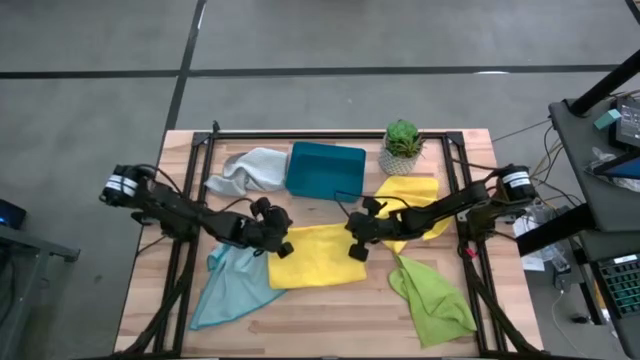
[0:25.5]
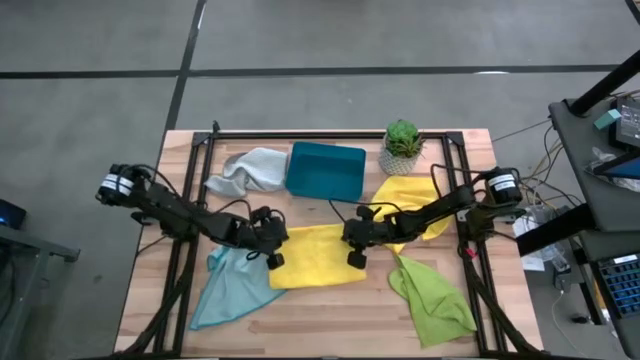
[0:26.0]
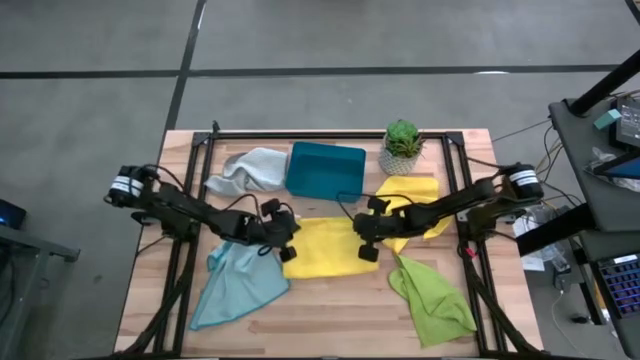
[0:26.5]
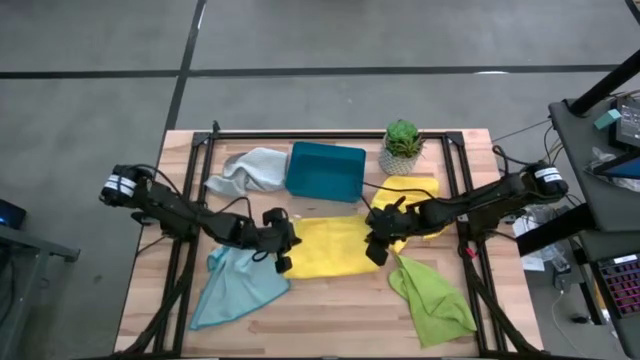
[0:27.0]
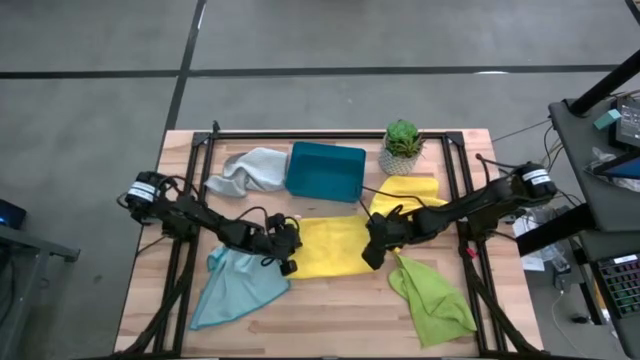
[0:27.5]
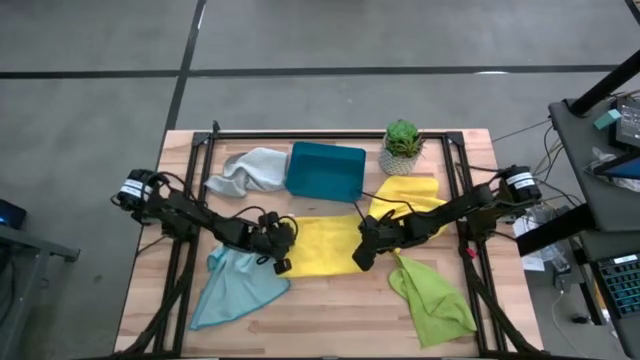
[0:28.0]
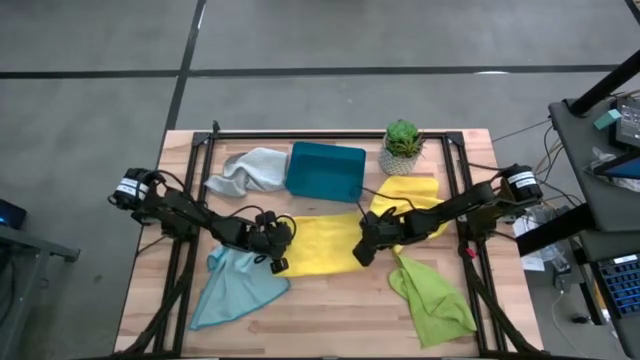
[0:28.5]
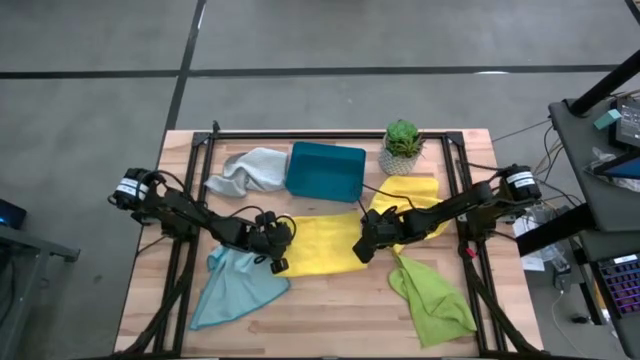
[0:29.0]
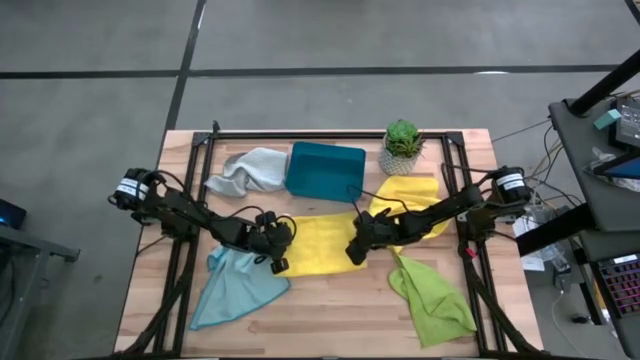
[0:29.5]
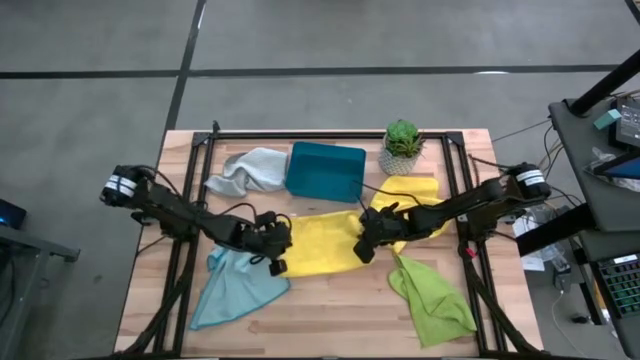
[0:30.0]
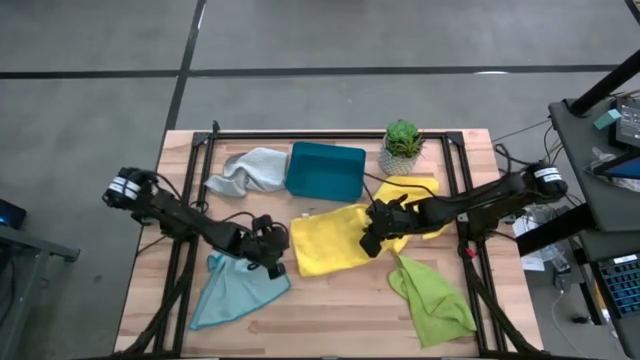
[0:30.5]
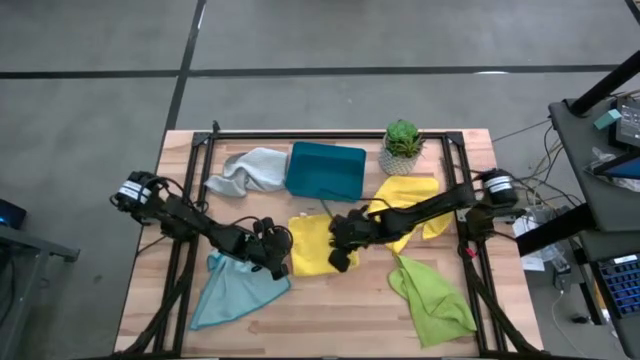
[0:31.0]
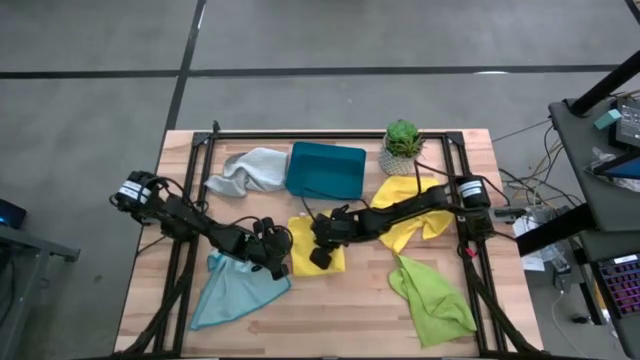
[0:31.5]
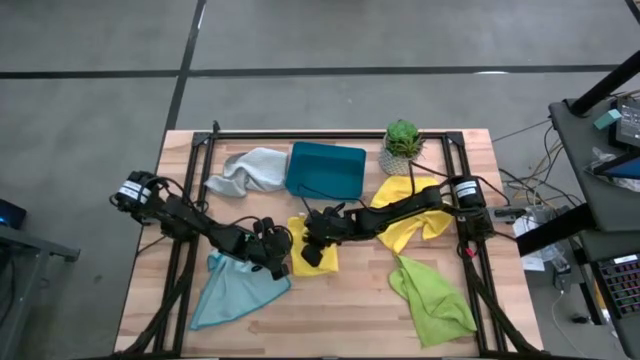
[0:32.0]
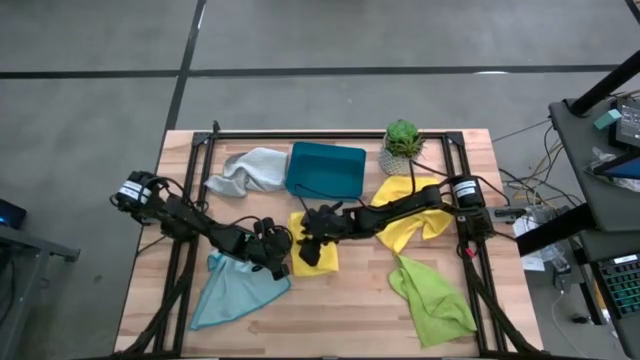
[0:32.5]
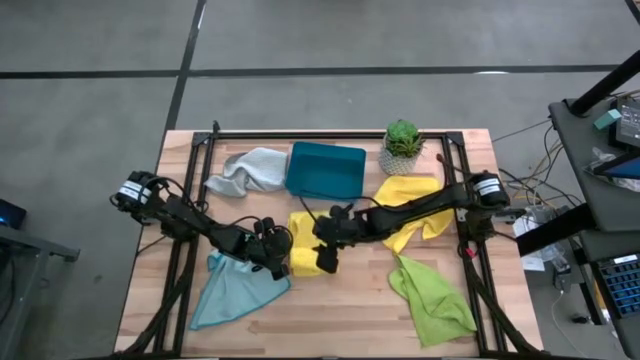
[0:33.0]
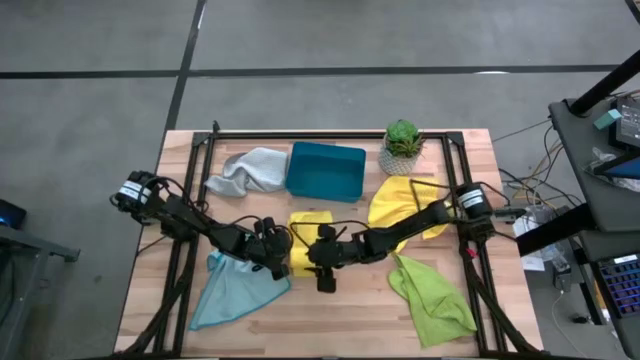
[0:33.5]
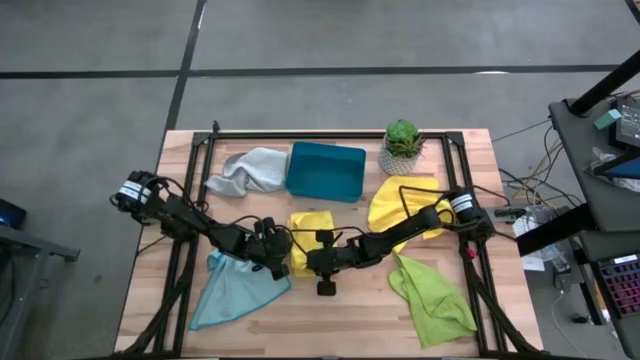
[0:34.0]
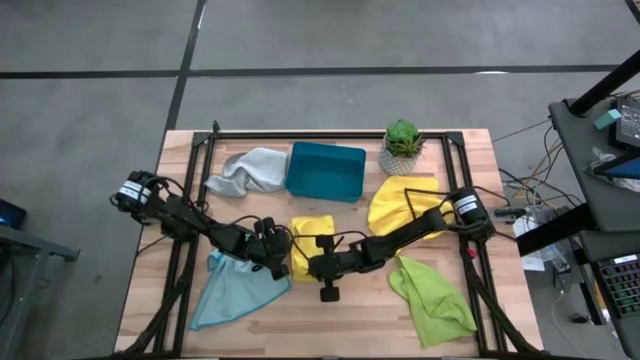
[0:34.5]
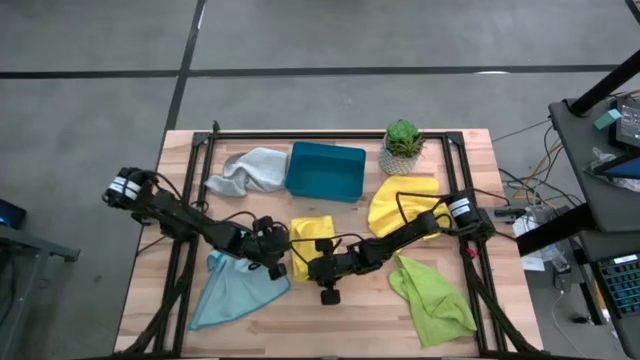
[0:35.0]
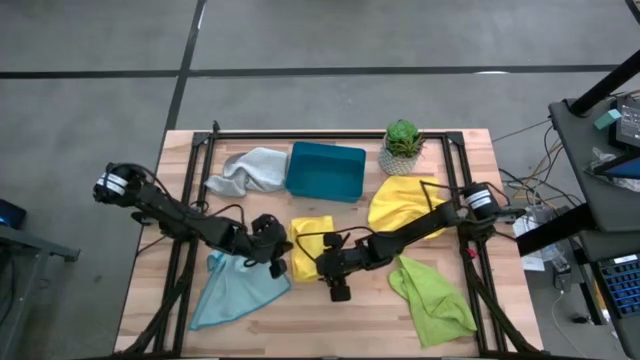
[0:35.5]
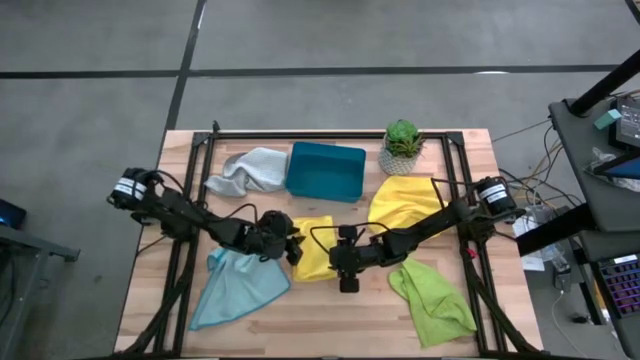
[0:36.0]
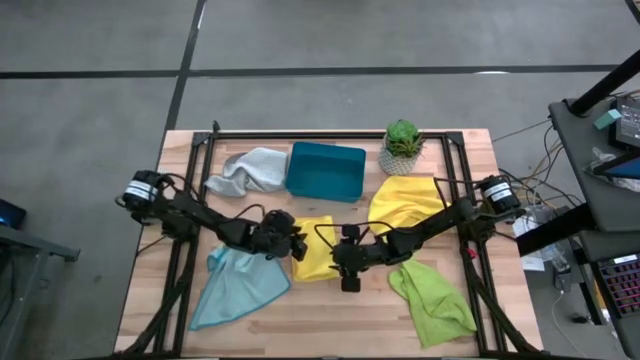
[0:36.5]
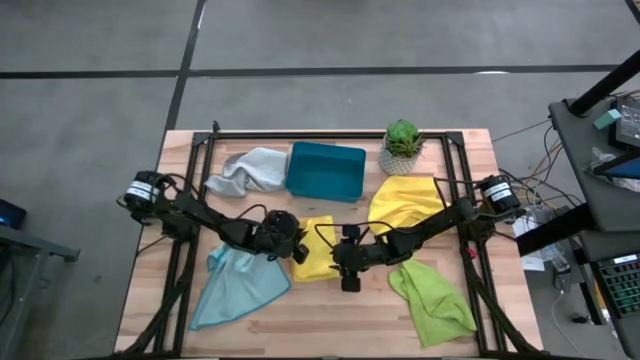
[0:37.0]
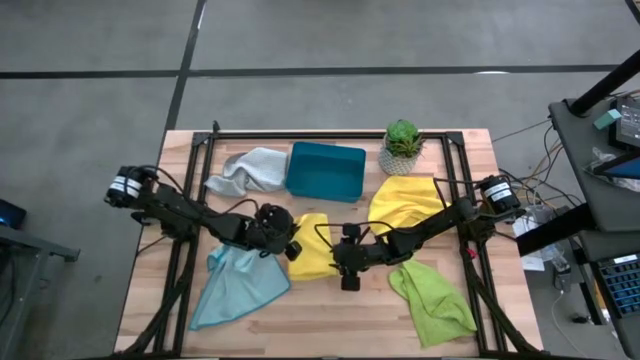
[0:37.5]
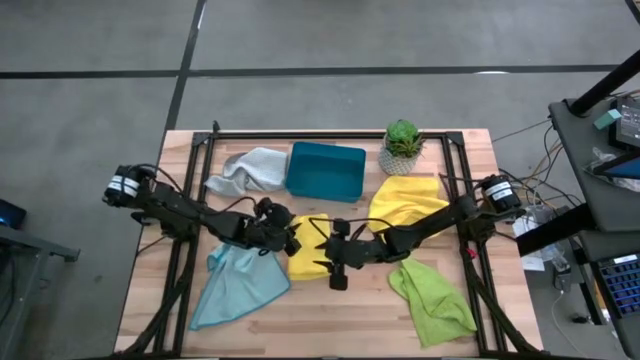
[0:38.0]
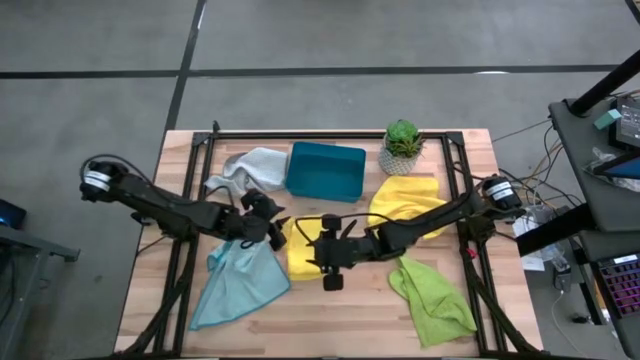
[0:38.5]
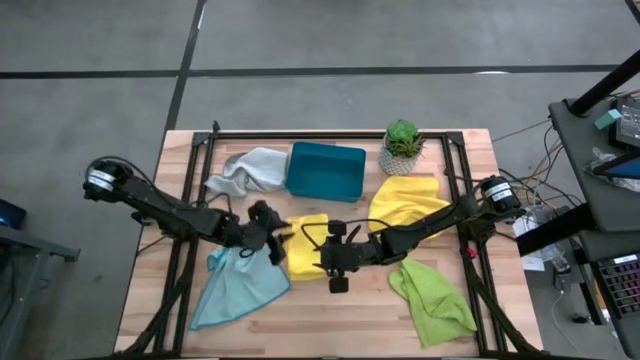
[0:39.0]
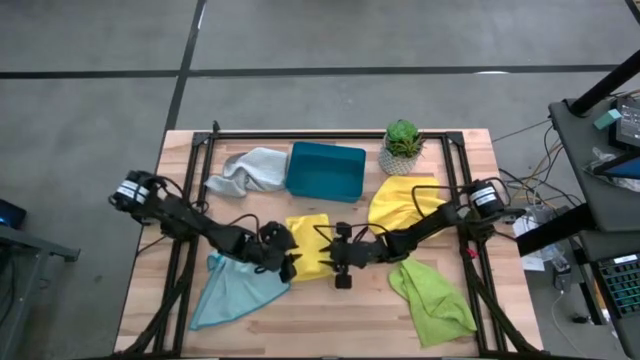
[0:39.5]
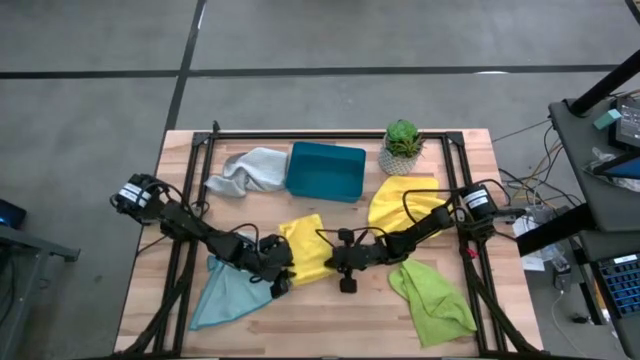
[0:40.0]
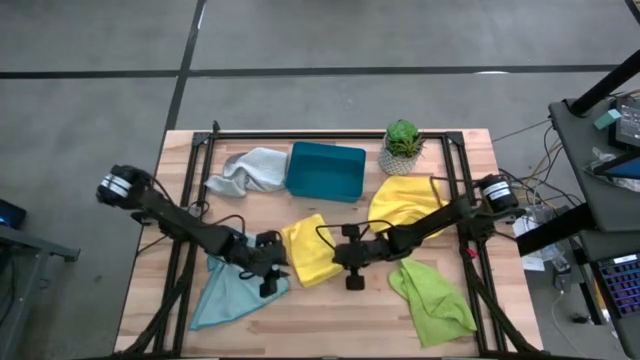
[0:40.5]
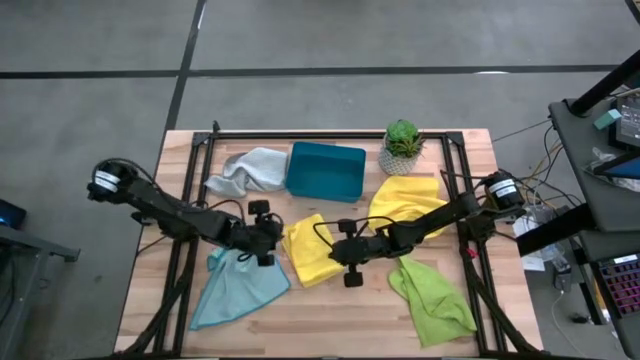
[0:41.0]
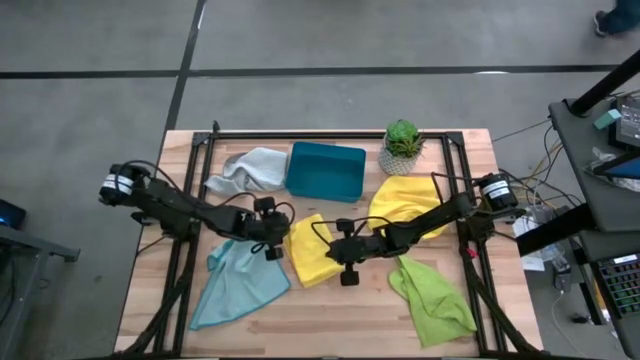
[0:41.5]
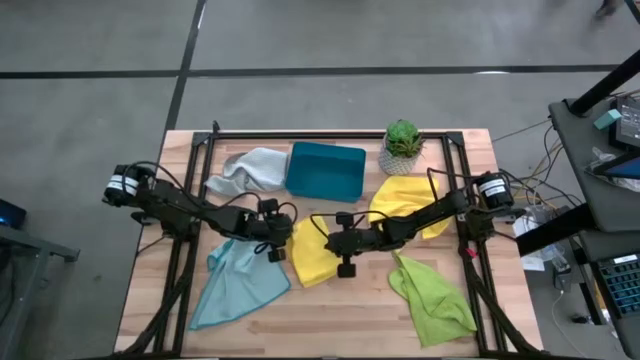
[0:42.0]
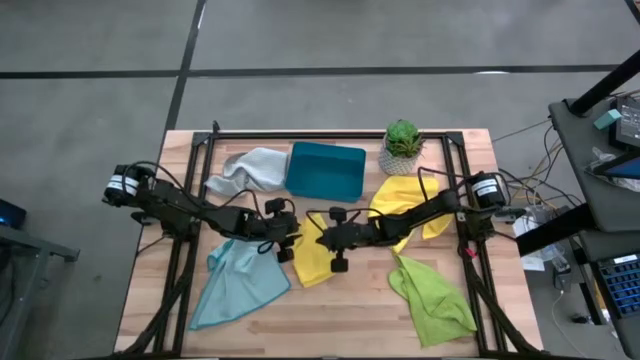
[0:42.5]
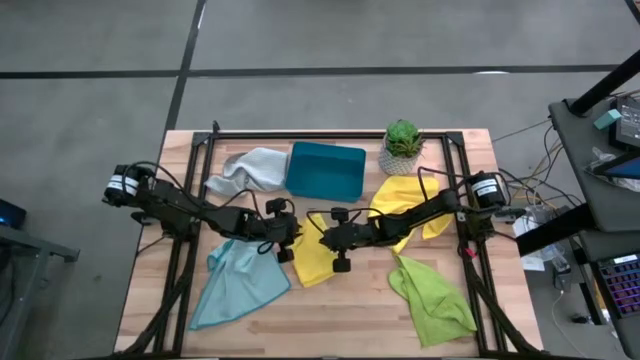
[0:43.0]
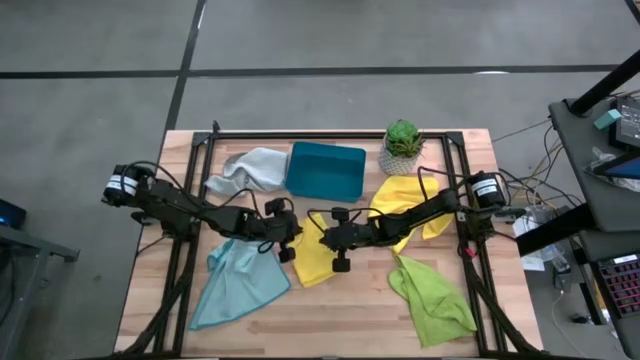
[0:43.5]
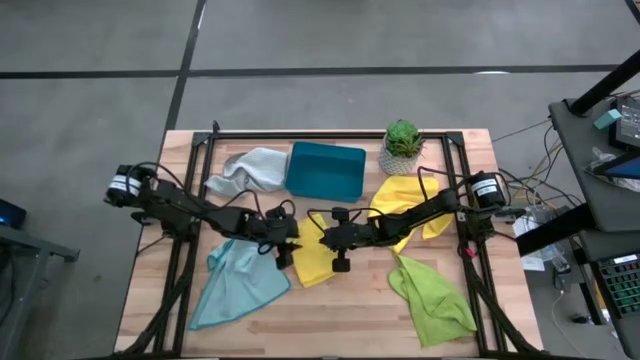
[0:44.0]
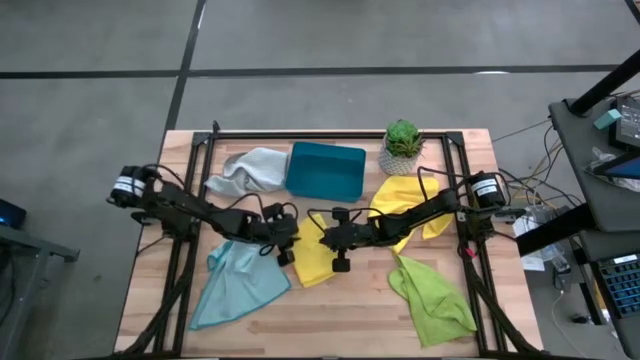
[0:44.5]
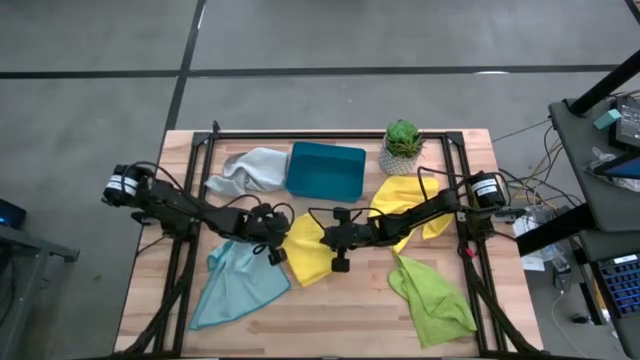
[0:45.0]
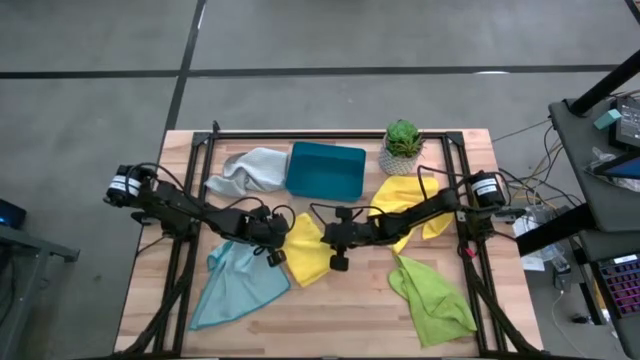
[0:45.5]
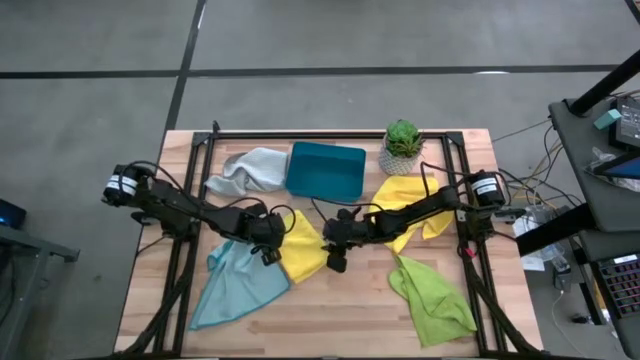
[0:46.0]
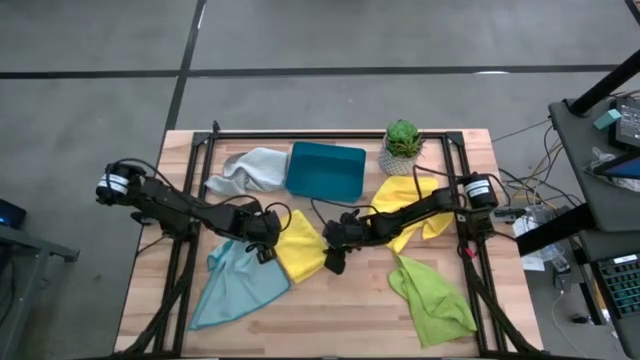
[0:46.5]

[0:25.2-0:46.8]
Task: Fold microfiber towels
Fold the left yellow microfiber cloth
